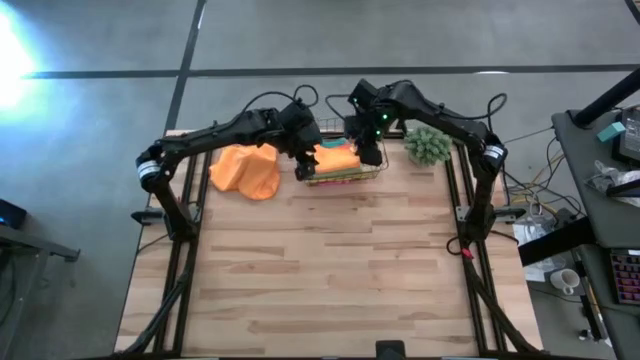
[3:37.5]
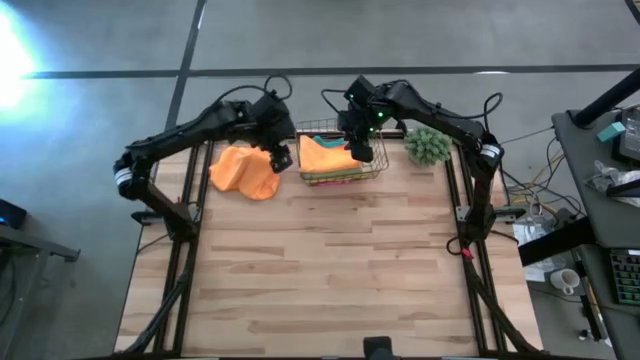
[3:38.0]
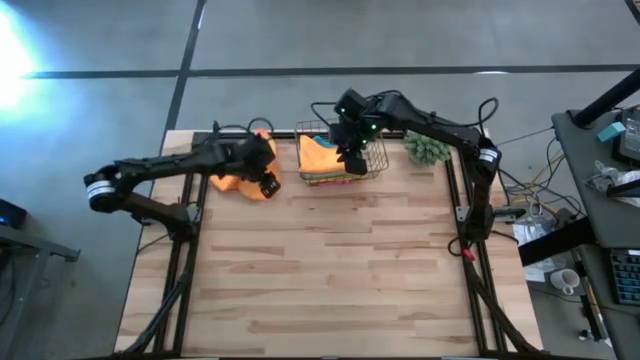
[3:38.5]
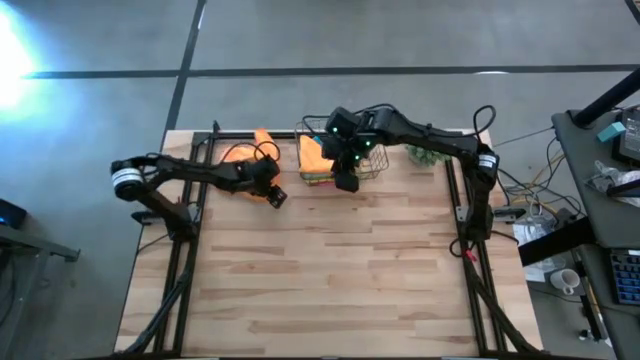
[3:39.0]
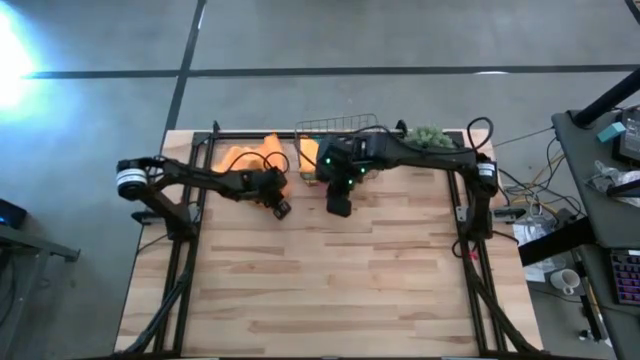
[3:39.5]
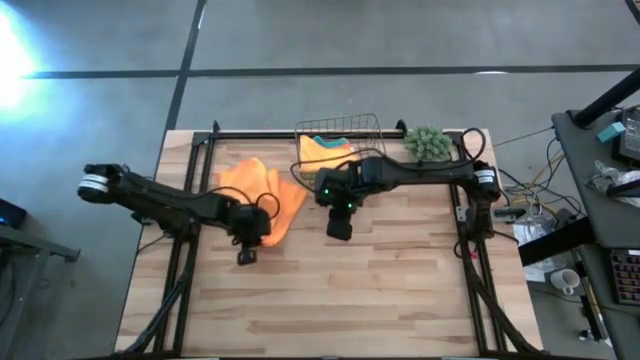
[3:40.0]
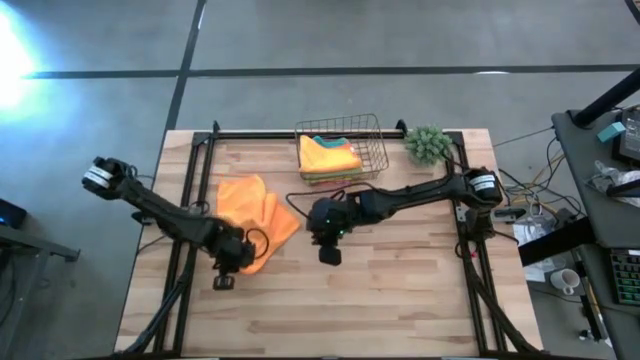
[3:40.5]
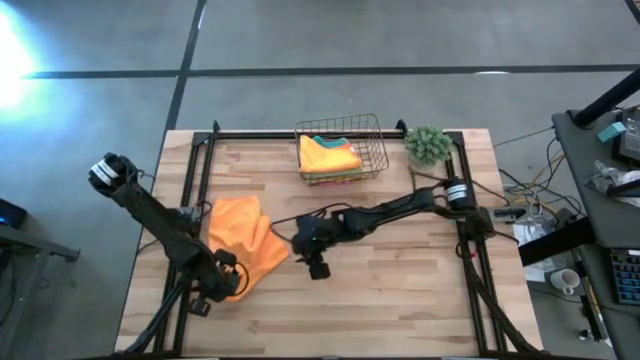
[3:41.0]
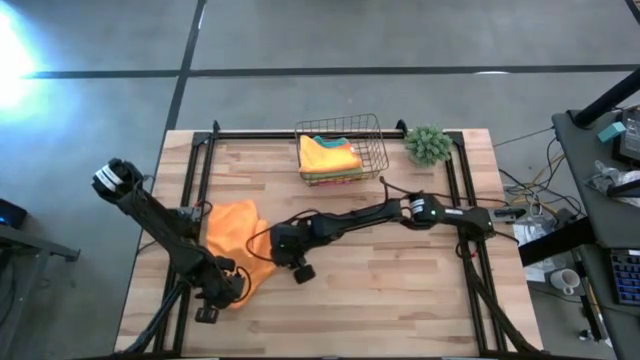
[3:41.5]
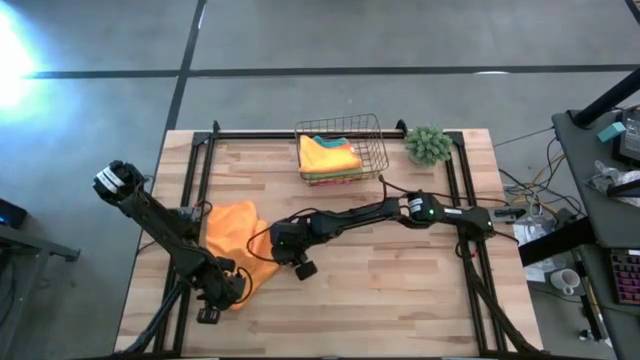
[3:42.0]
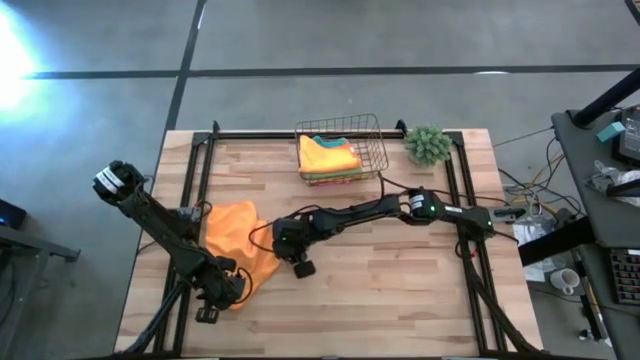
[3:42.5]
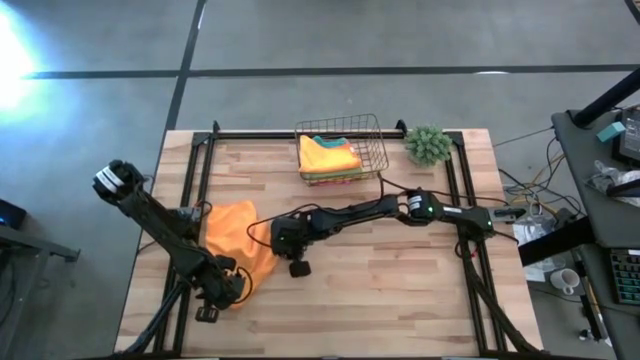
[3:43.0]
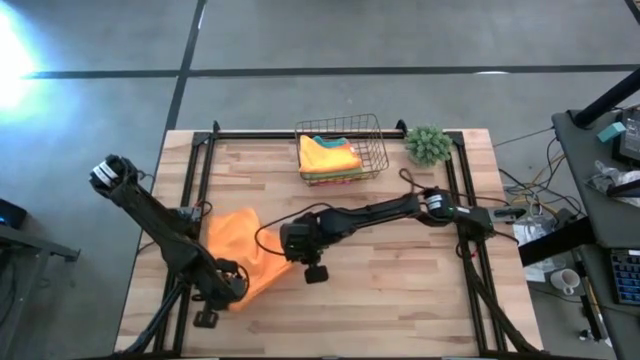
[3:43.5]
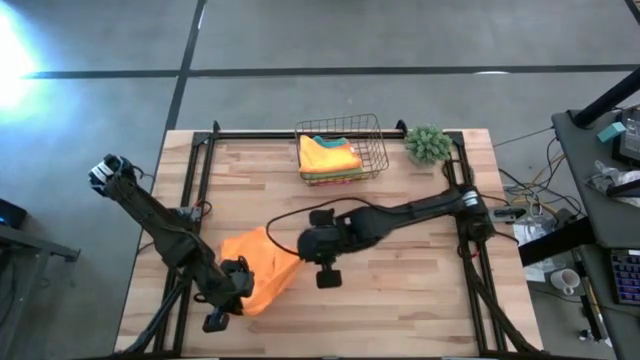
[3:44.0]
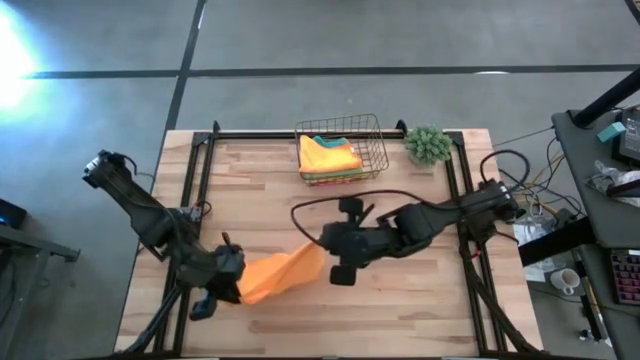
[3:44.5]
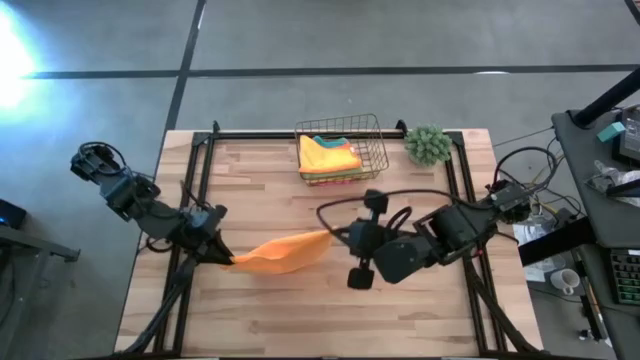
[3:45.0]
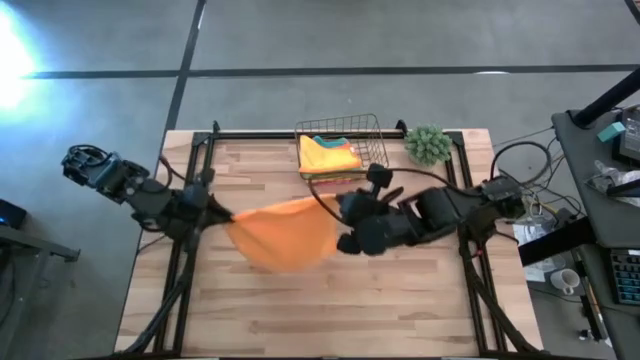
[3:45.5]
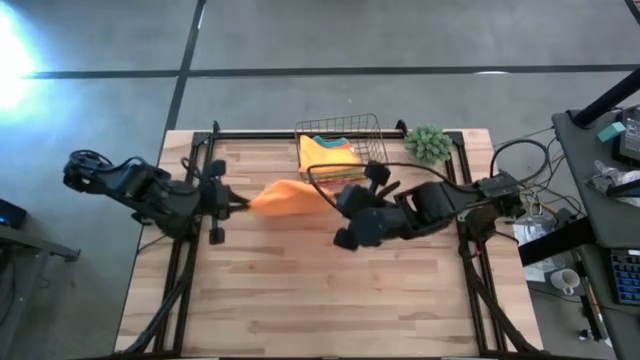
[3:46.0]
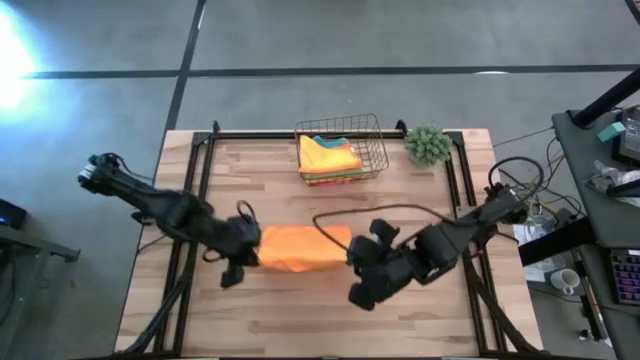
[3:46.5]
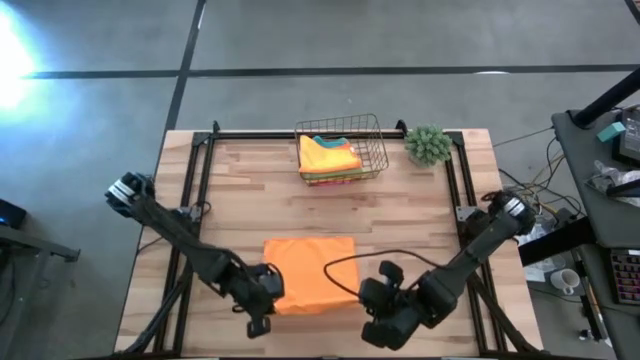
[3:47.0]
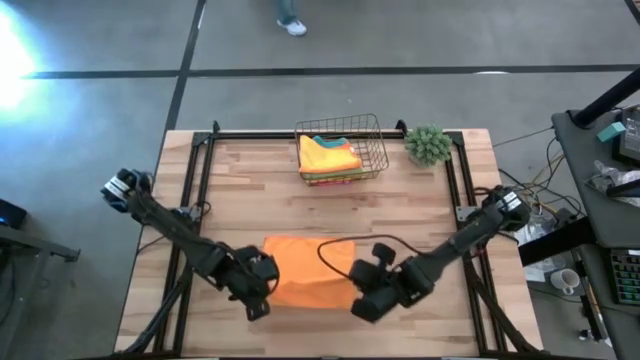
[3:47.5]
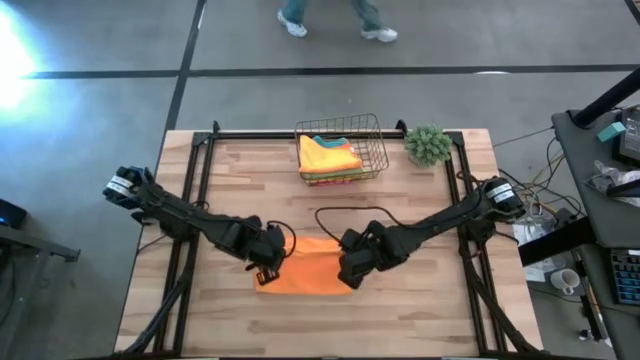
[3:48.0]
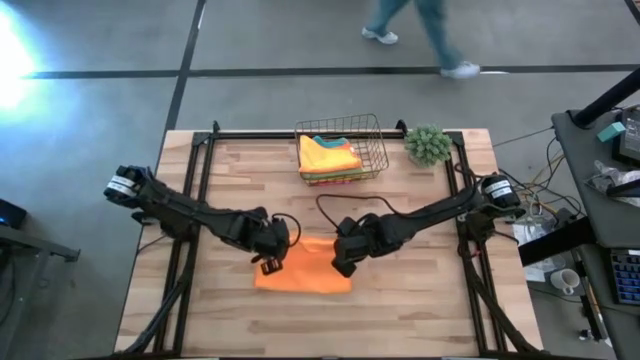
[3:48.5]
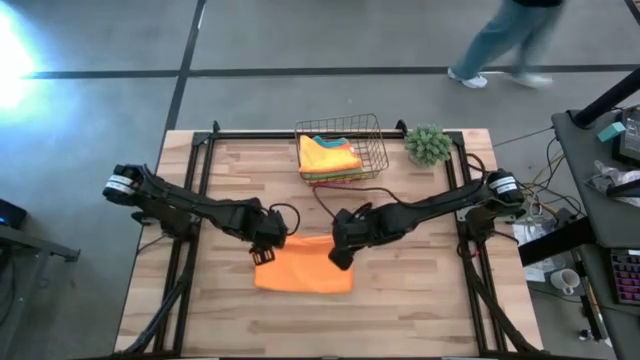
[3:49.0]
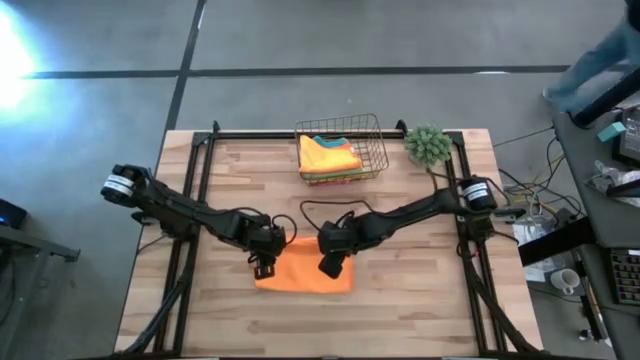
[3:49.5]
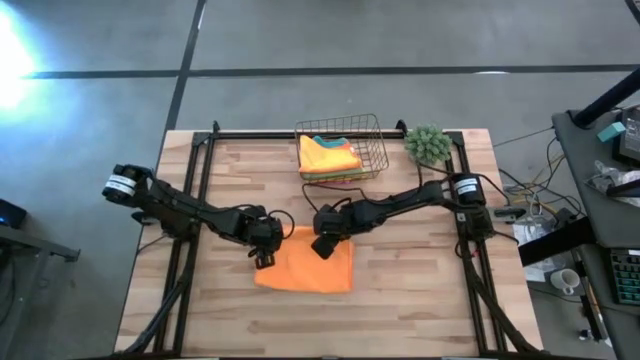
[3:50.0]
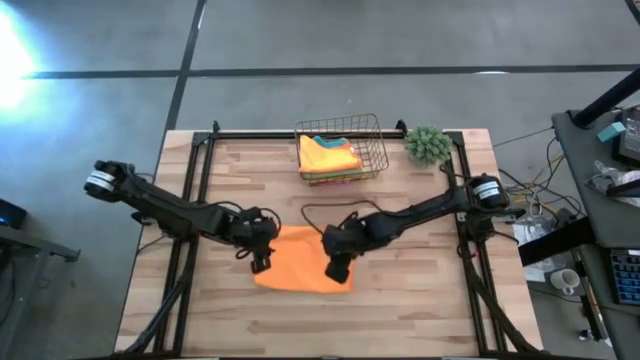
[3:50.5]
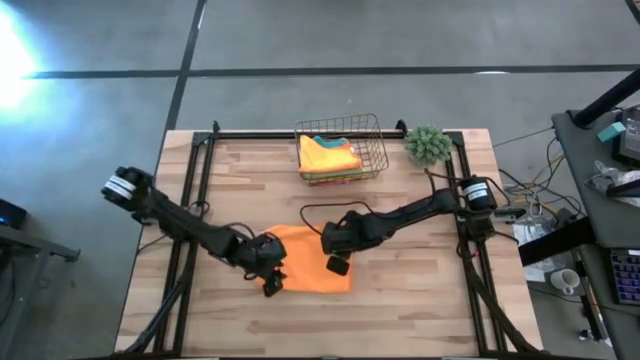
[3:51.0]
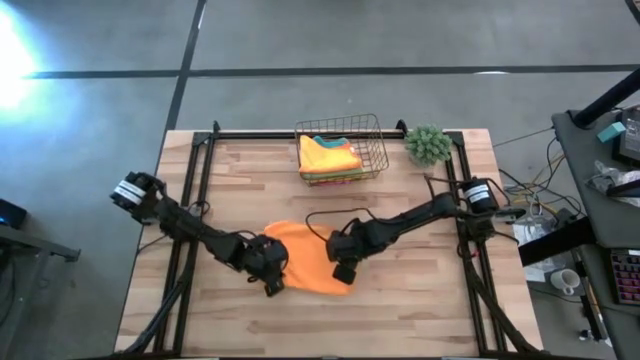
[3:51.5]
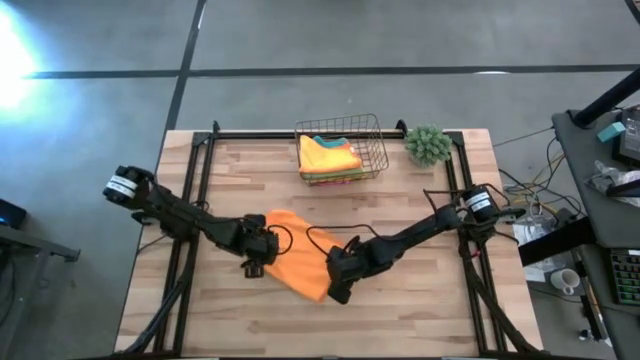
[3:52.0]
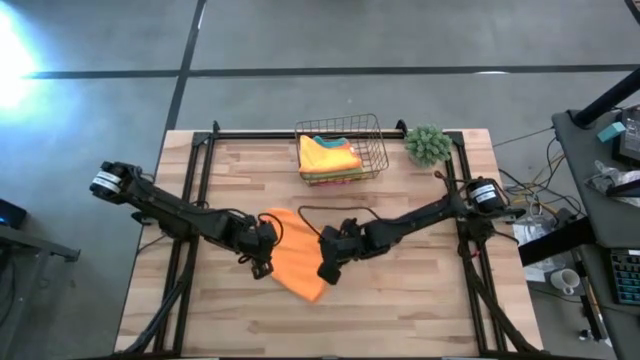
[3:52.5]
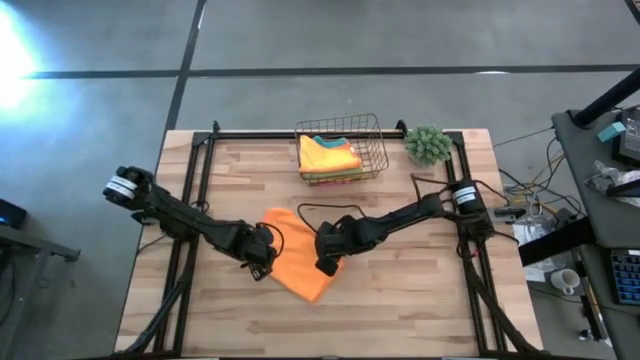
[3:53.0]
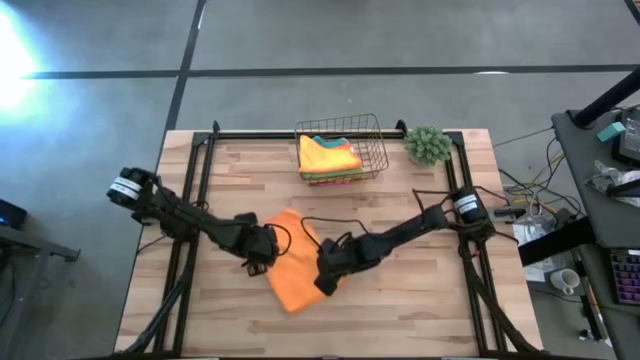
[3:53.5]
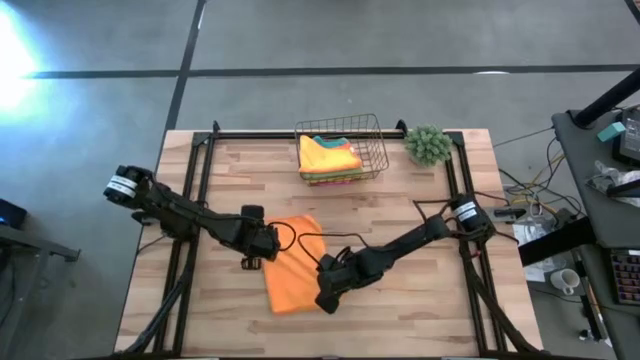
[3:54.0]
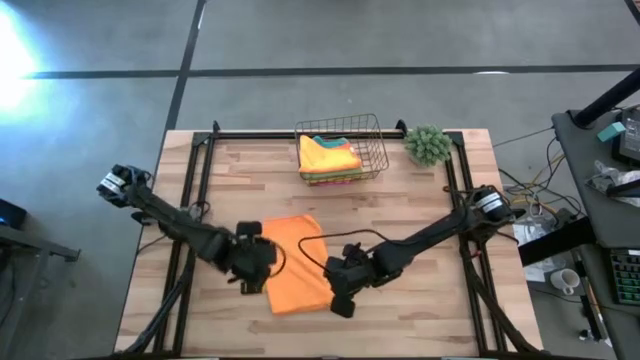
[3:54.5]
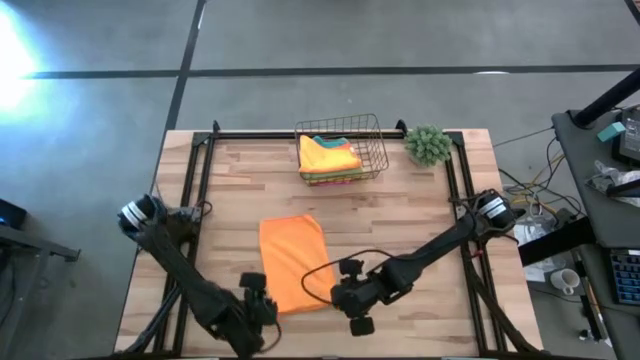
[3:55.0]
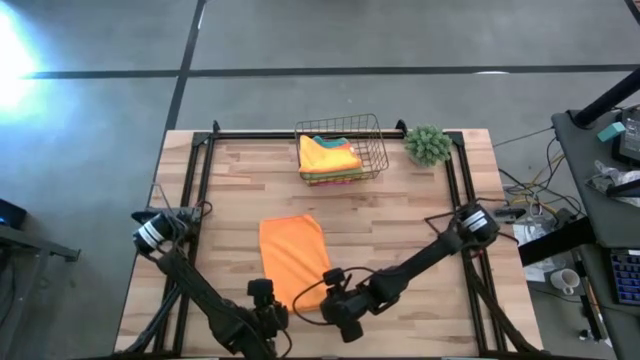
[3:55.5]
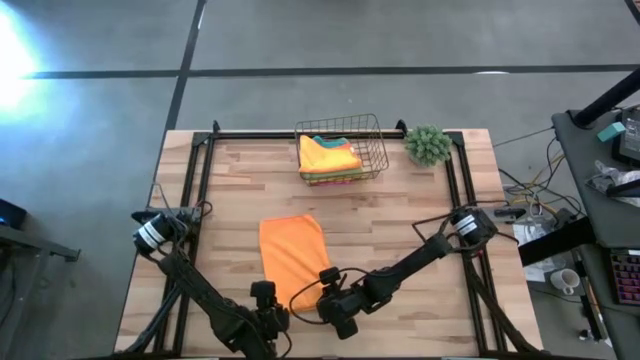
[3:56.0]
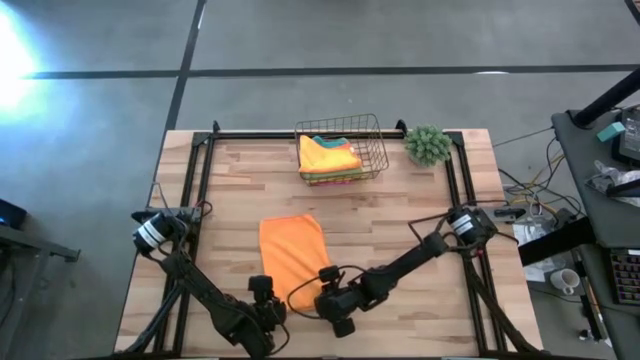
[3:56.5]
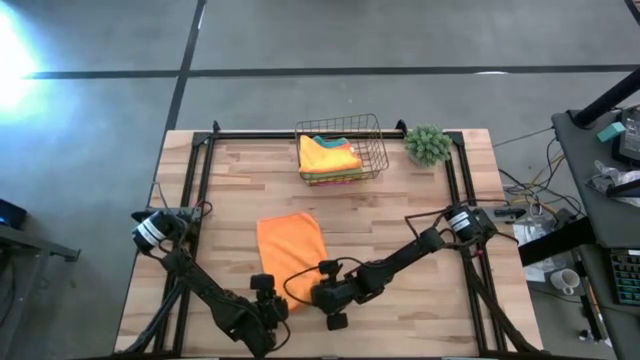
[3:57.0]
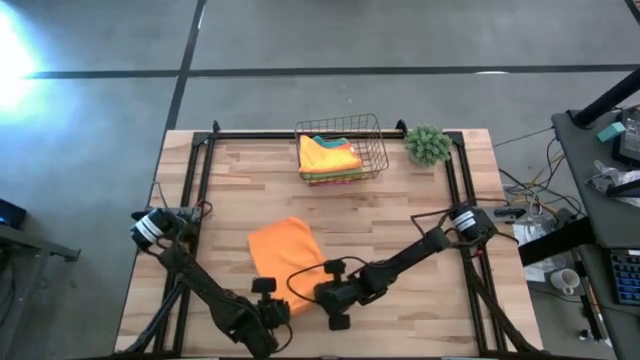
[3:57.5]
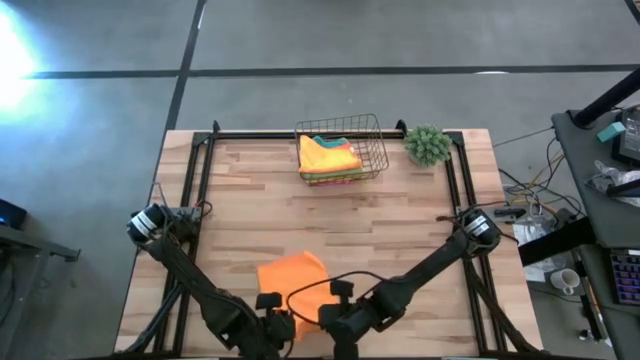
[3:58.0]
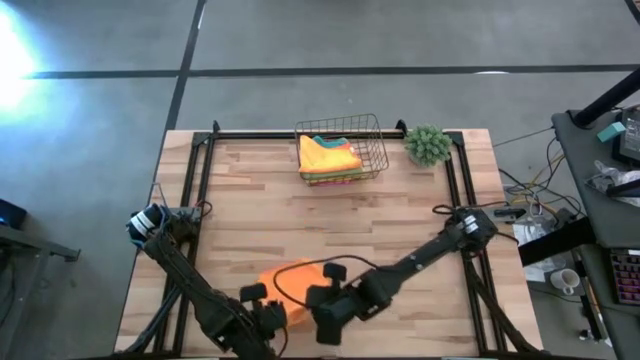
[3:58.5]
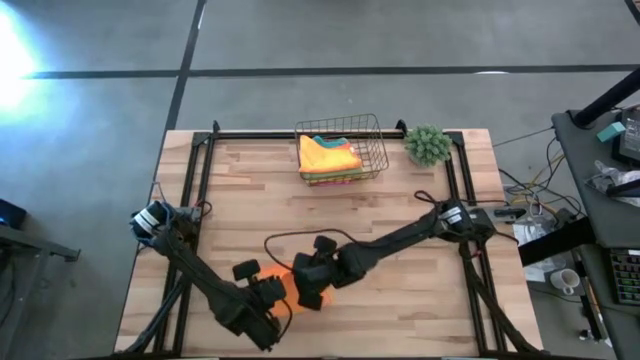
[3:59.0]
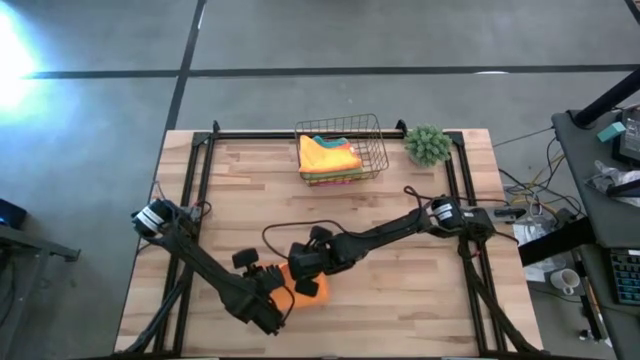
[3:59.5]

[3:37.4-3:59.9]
Task: Fold microfiber towels
Fold the orange microfiber cloth
